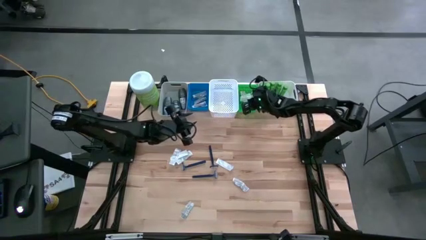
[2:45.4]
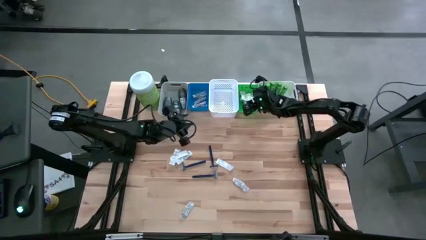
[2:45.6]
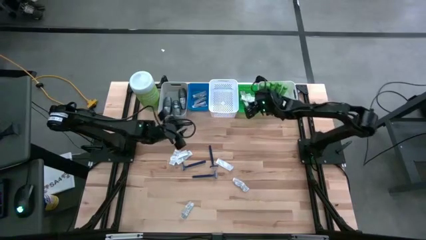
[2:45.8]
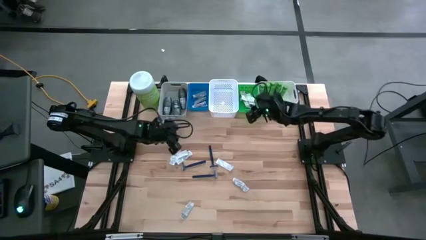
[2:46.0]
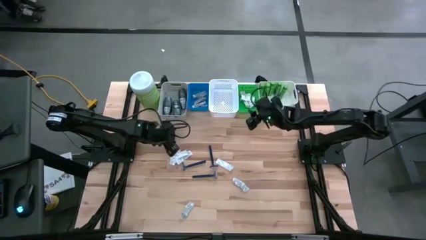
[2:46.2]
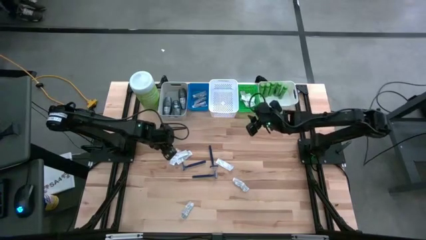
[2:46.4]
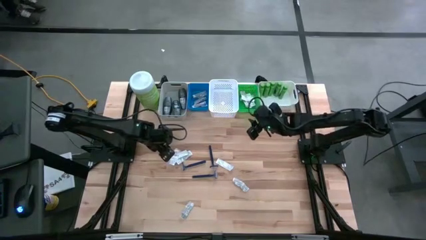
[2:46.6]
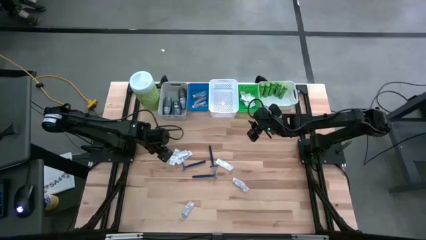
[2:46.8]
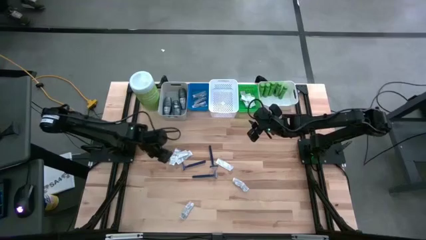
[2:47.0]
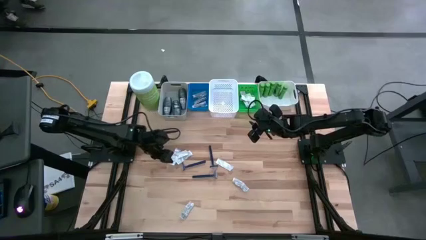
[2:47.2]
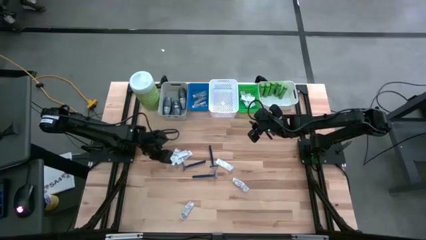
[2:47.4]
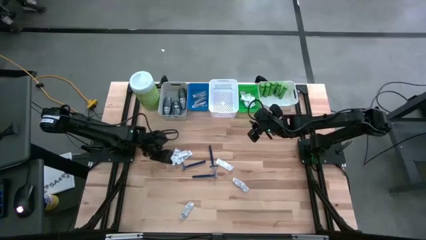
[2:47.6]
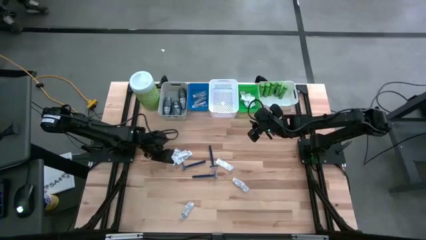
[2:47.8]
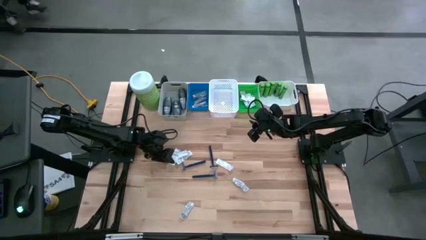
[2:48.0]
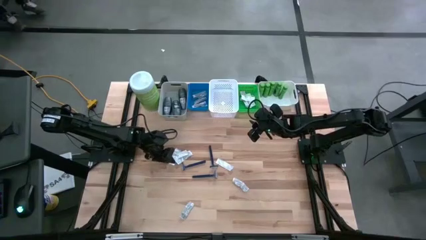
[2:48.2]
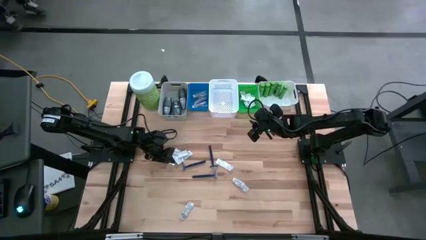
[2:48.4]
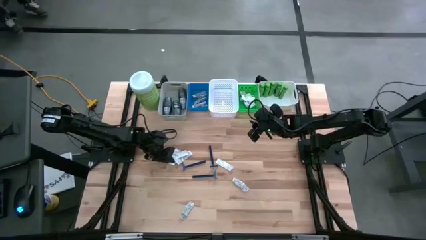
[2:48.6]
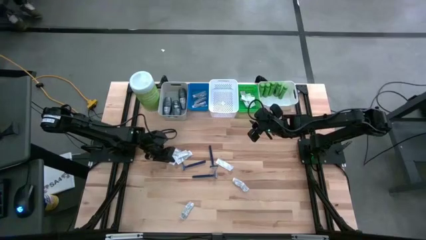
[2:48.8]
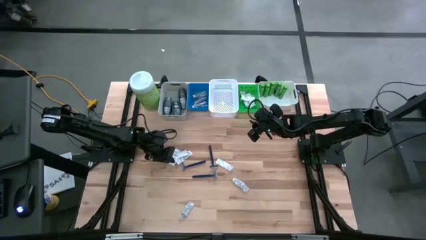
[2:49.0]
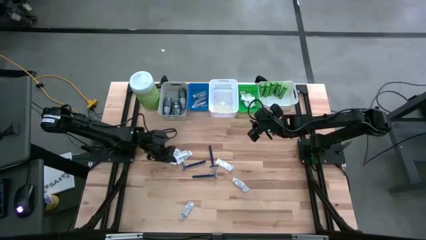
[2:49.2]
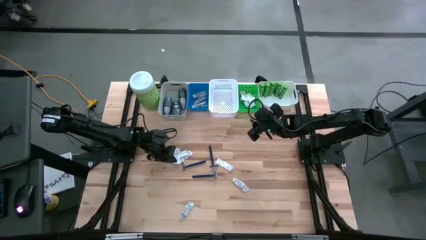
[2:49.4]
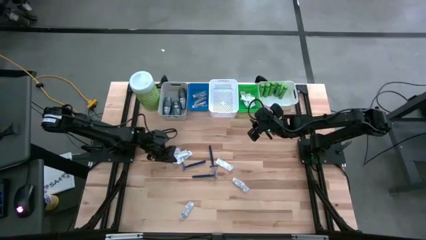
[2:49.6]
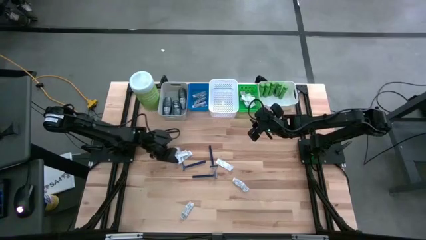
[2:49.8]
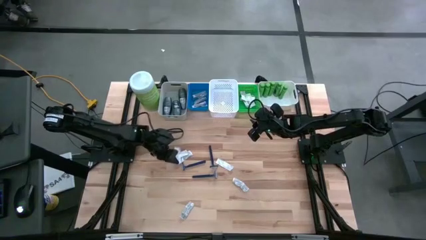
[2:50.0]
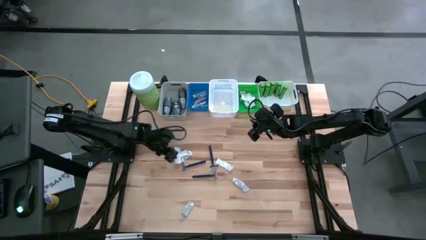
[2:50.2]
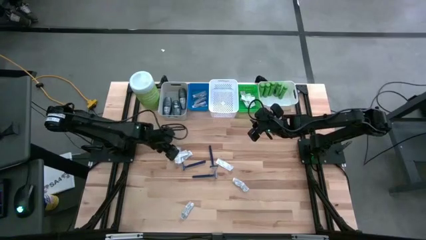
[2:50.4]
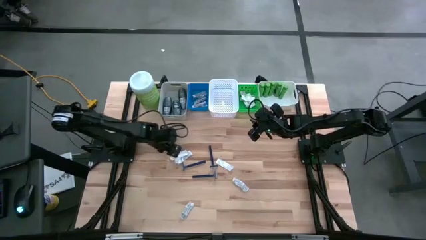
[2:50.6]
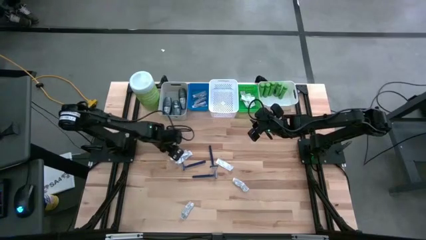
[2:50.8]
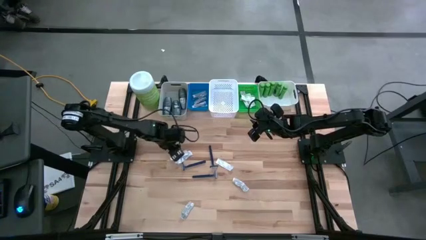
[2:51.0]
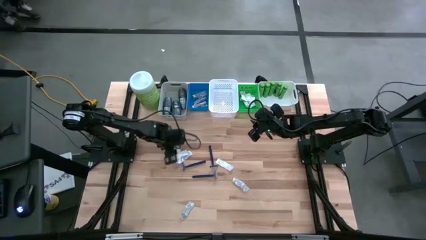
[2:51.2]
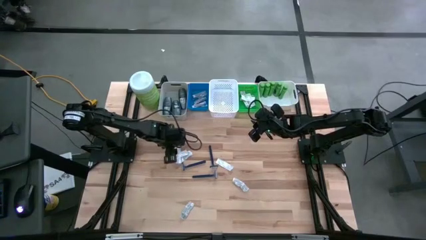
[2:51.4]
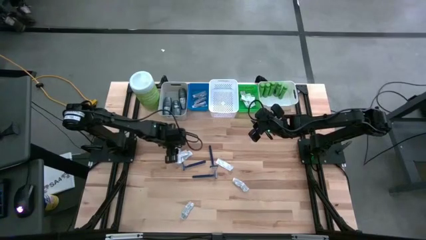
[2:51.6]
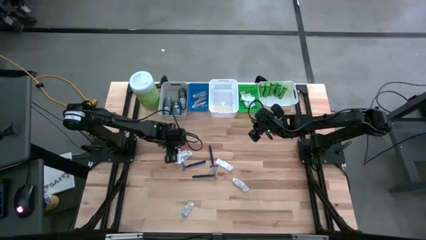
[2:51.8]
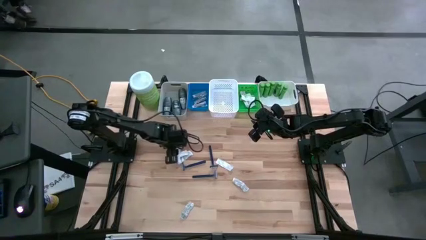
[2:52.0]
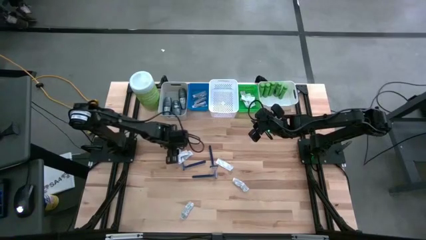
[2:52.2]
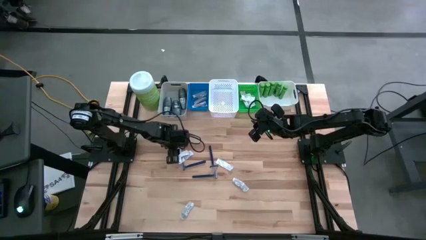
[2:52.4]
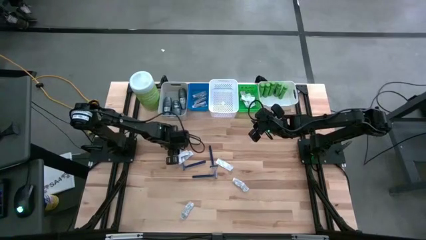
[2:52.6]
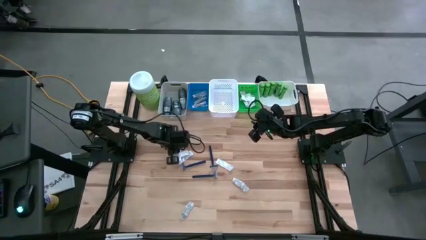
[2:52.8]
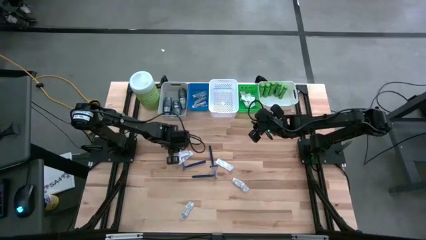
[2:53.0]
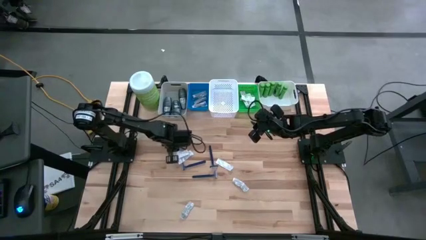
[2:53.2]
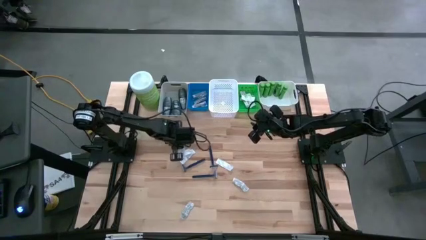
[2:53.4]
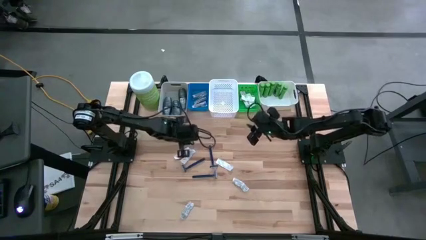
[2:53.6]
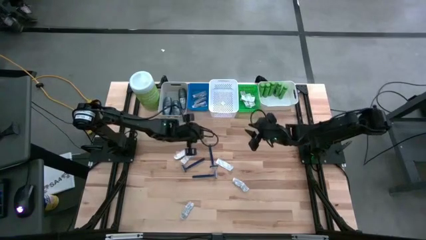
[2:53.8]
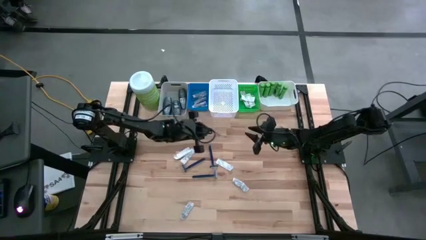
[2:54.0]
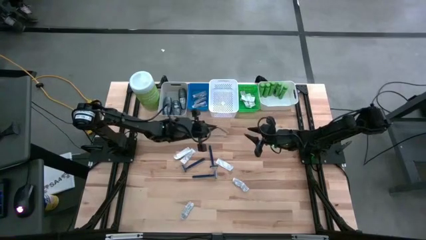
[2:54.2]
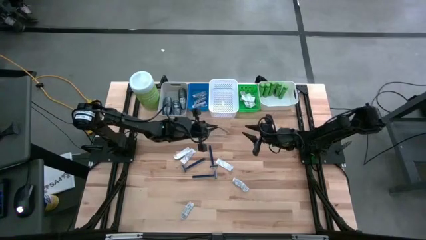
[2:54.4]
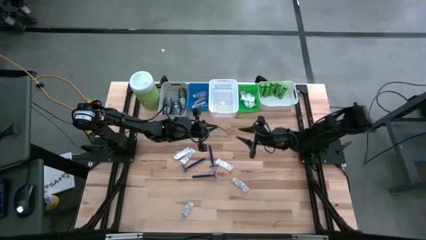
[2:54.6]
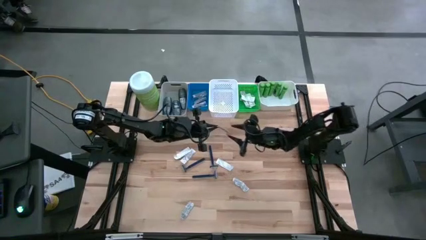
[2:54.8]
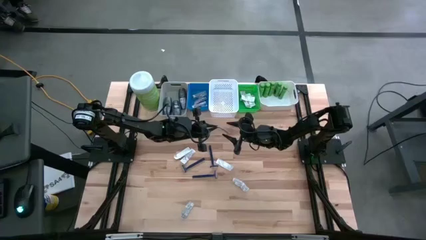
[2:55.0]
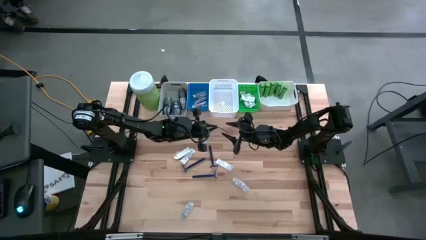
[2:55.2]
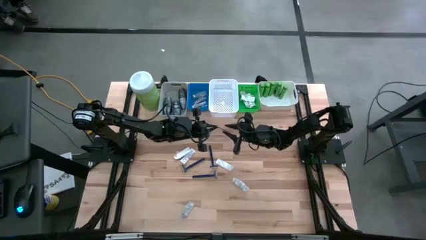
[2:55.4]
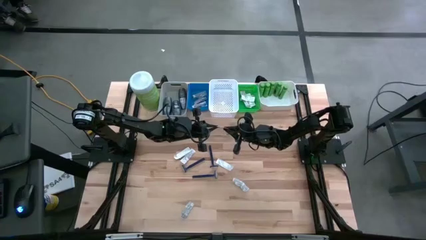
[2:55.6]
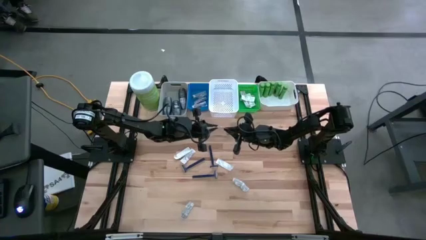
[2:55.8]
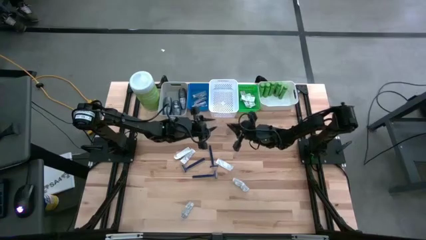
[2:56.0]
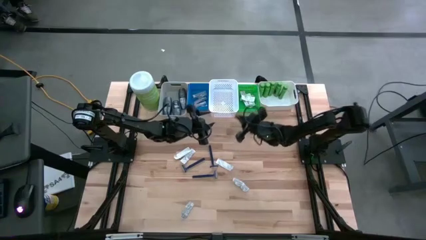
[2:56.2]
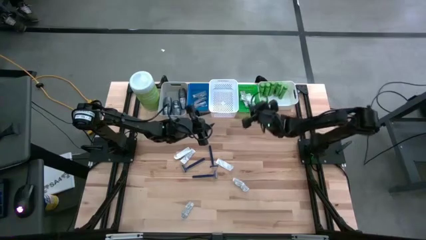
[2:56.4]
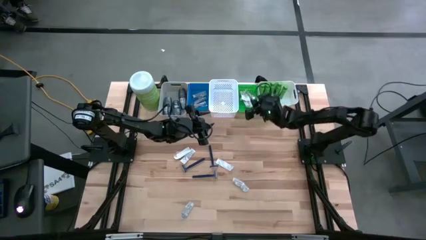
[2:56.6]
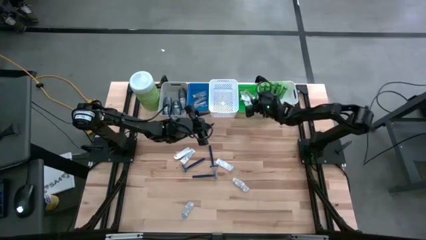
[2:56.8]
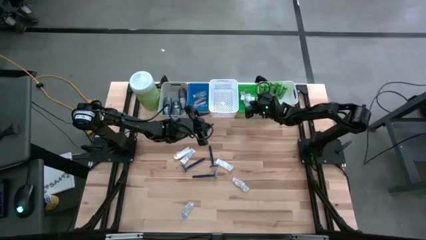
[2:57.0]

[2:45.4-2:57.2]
Task: Pick & Place Travel size toiletries
Put the white bandage pack into the green bin

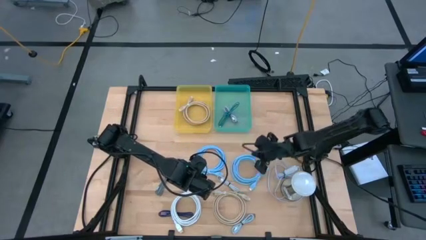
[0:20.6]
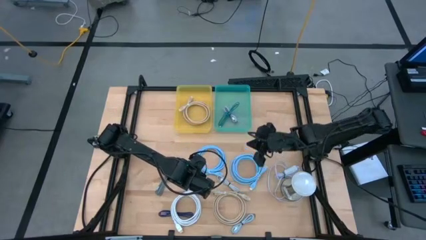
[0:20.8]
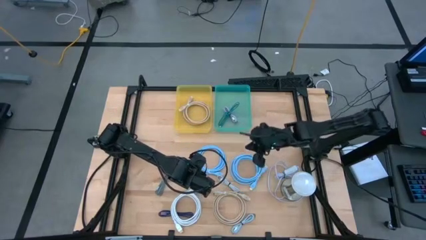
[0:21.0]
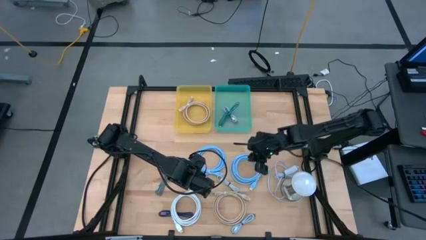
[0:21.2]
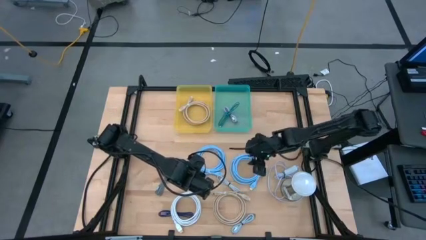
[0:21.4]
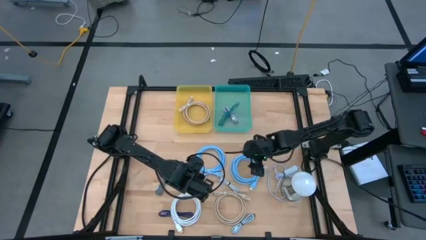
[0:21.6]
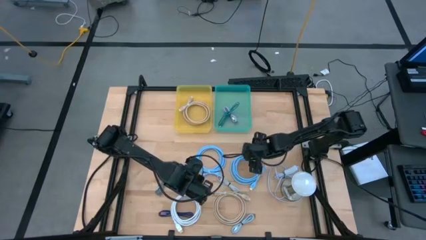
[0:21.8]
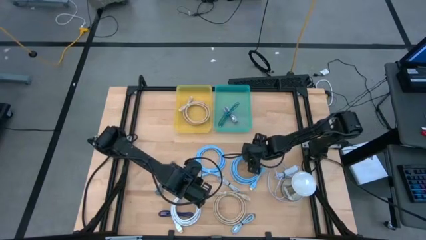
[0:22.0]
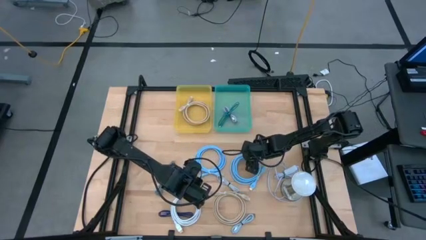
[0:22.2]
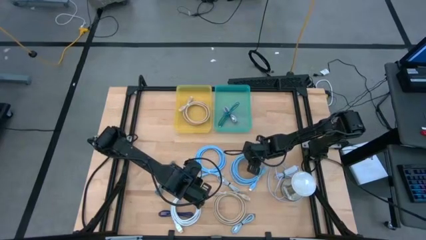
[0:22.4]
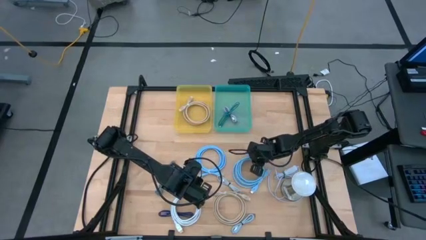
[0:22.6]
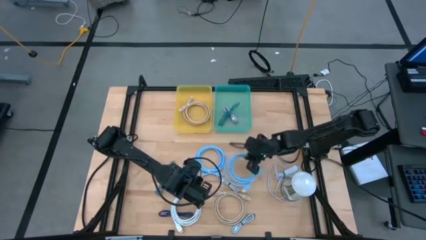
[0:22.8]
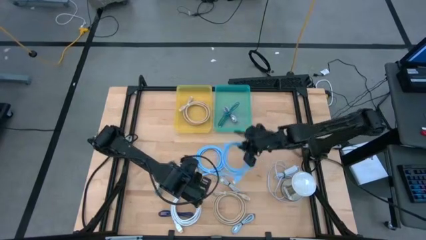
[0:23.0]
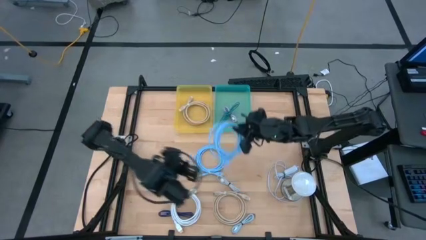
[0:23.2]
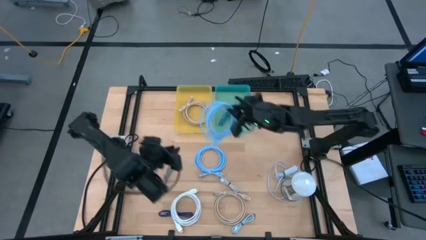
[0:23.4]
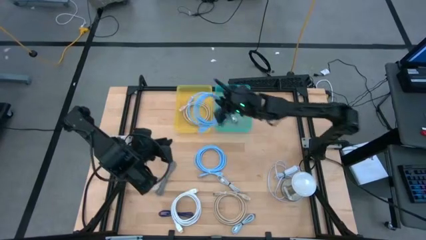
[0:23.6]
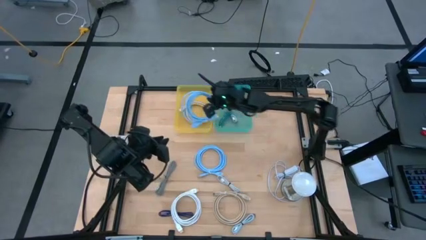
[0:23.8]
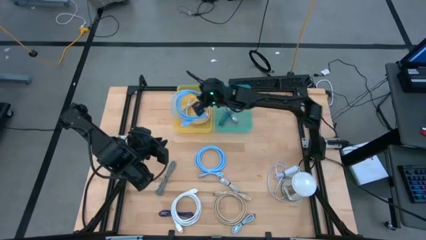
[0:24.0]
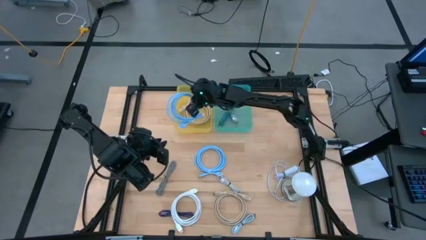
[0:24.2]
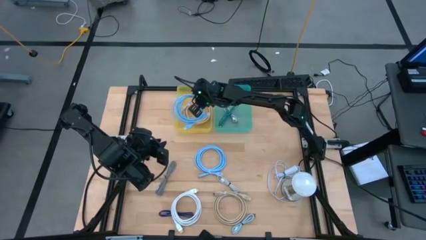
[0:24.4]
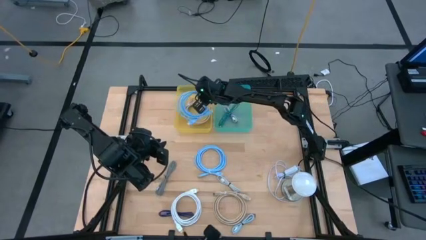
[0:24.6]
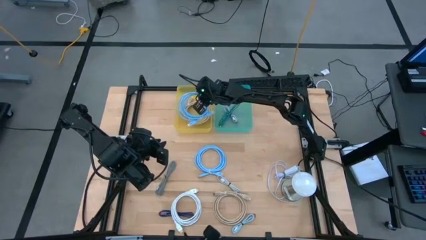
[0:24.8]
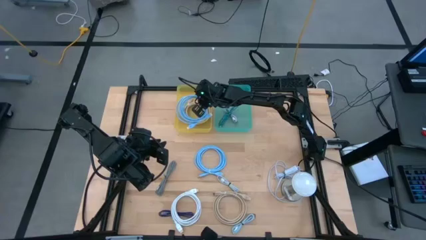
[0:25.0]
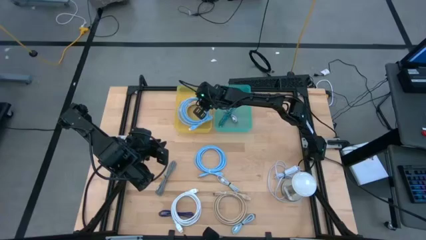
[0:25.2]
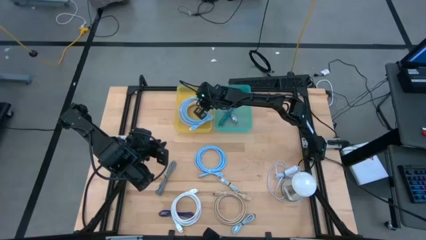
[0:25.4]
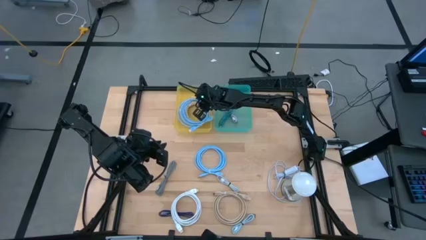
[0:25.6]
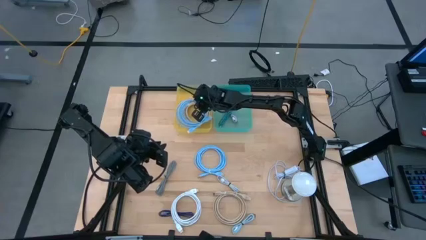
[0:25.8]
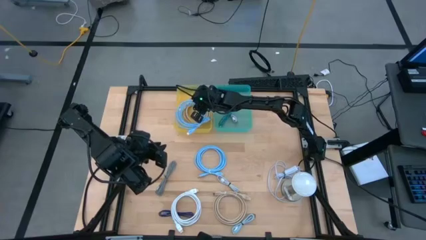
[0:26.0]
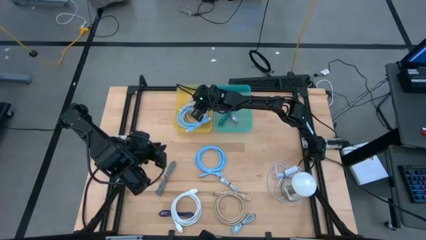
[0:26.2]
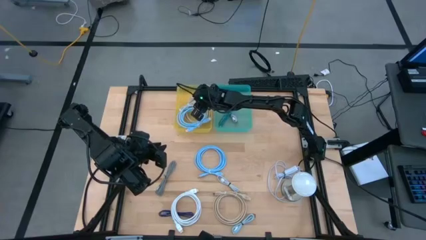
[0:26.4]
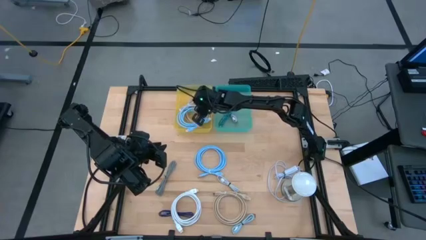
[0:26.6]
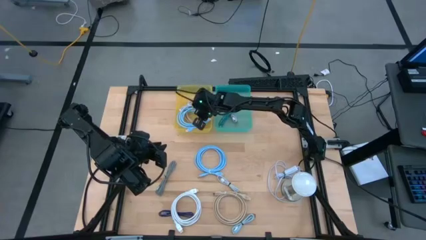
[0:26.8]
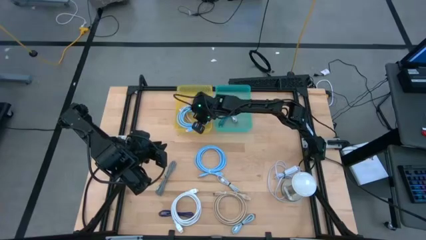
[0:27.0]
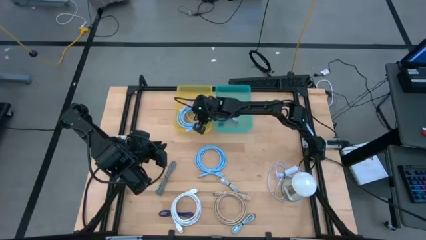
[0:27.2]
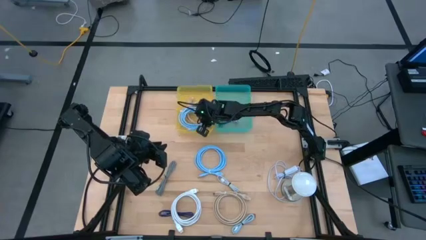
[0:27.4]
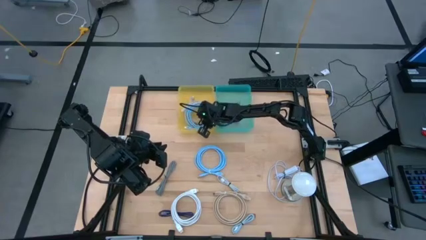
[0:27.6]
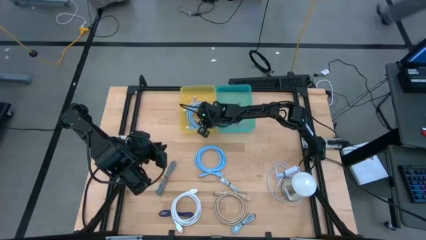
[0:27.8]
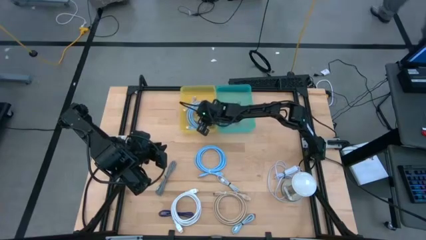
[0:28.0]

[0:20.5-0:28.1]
Task: Pick & Place USB Port
Put the right blue HDMI cable into the yellow bin
